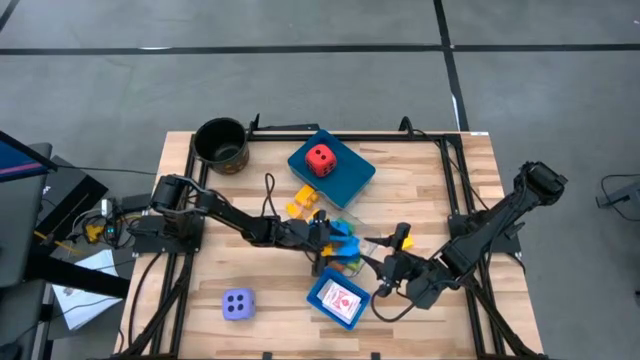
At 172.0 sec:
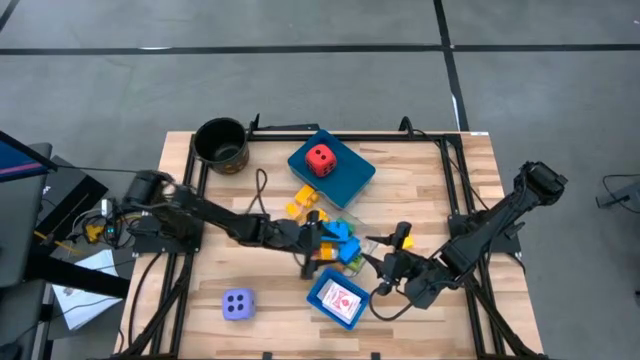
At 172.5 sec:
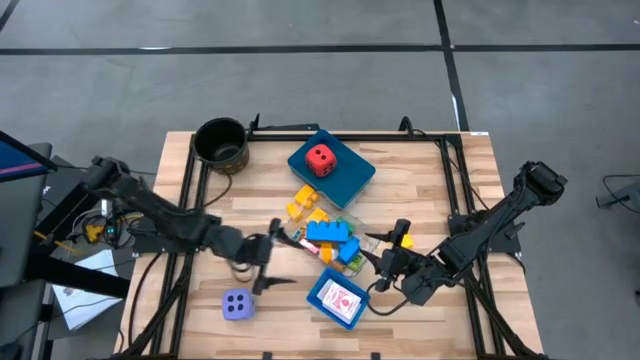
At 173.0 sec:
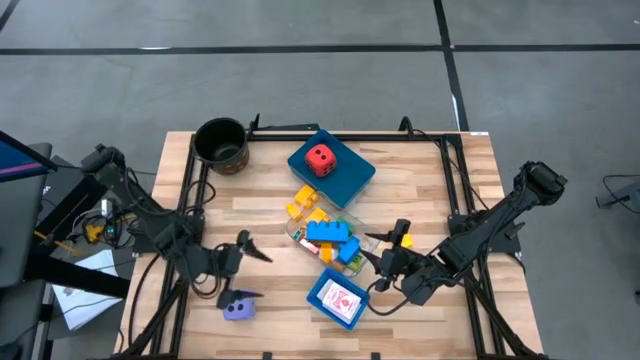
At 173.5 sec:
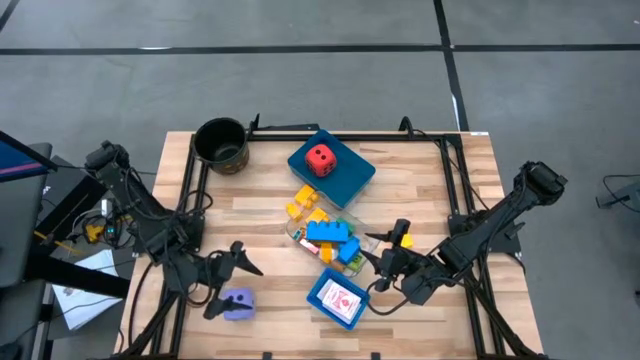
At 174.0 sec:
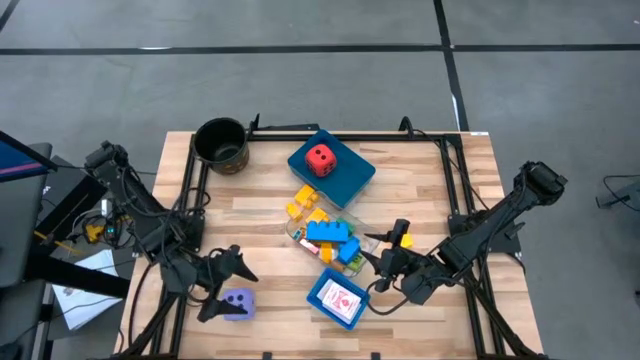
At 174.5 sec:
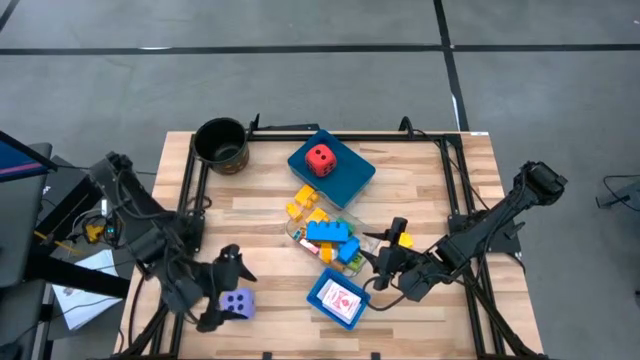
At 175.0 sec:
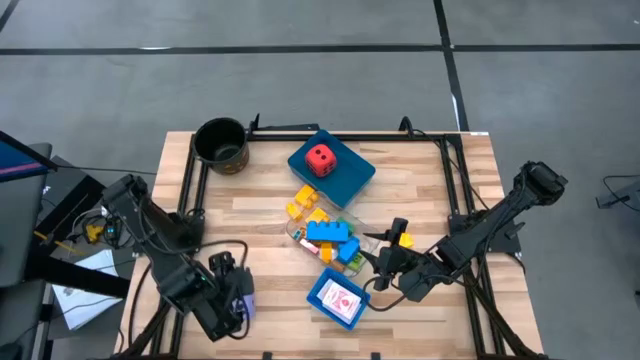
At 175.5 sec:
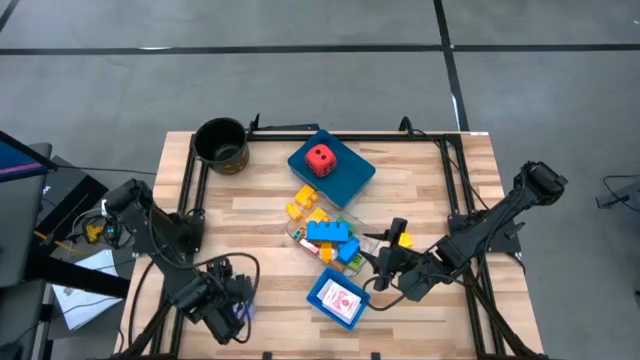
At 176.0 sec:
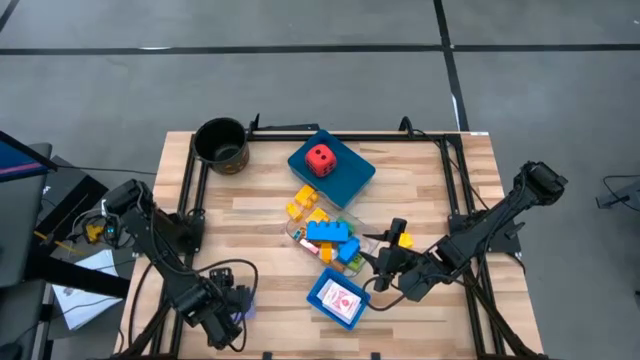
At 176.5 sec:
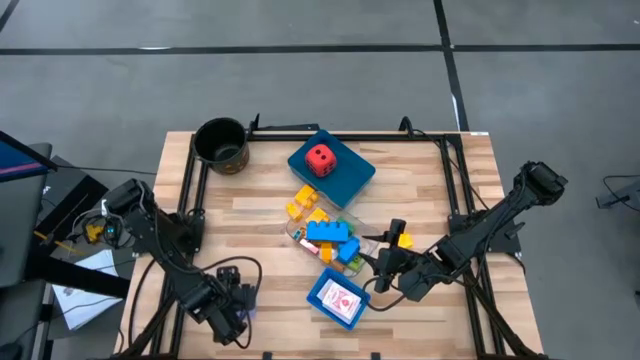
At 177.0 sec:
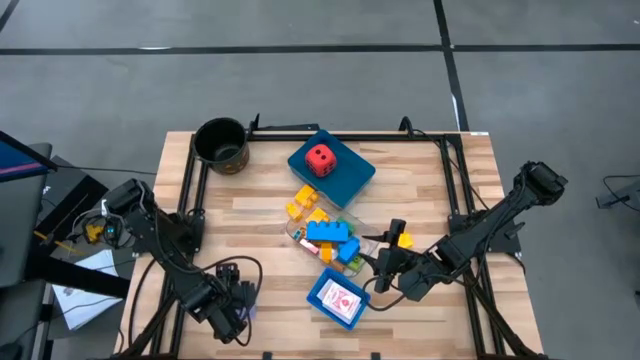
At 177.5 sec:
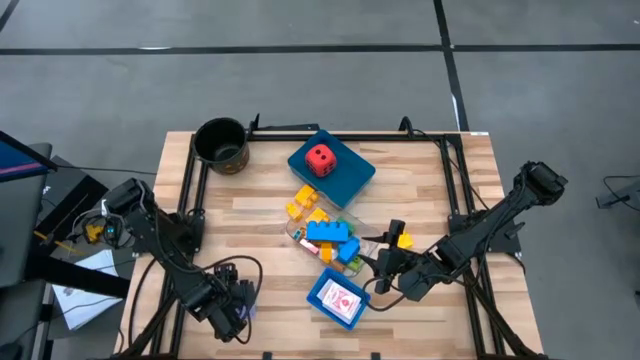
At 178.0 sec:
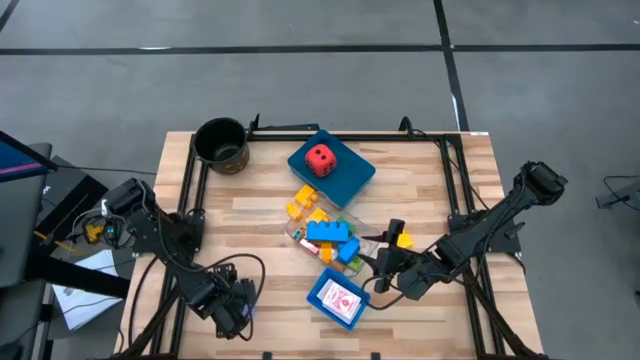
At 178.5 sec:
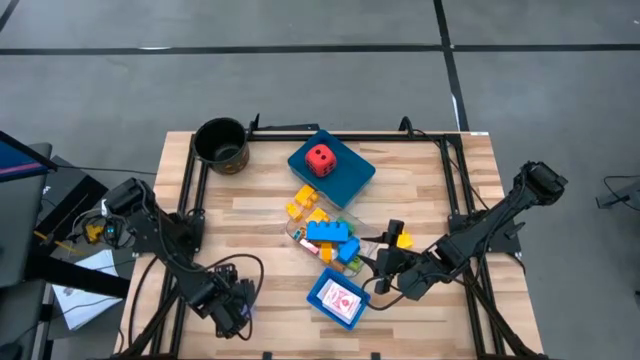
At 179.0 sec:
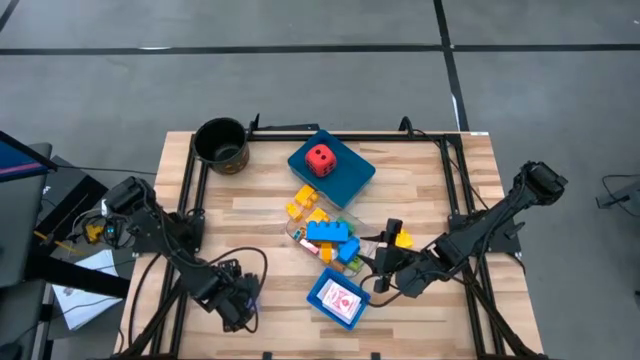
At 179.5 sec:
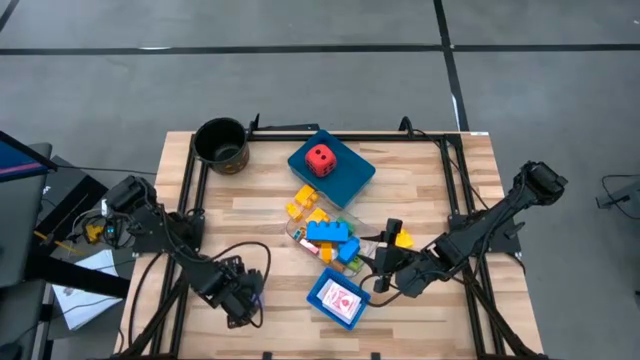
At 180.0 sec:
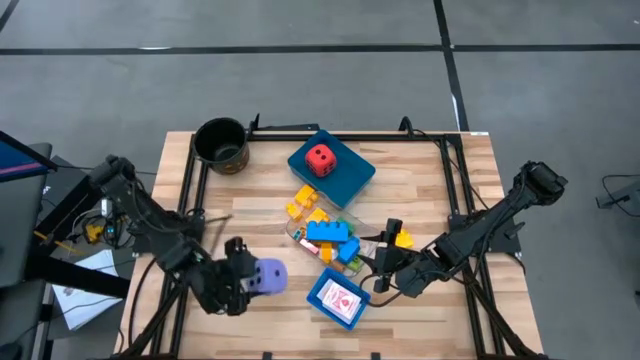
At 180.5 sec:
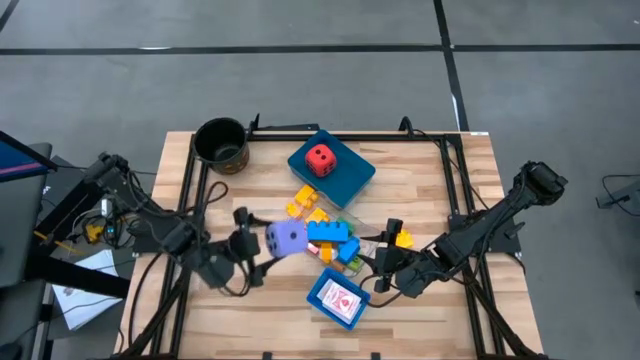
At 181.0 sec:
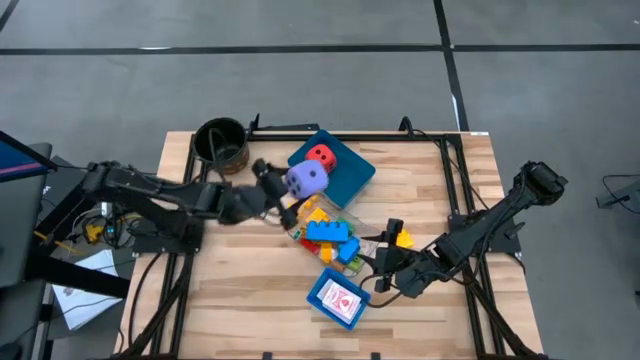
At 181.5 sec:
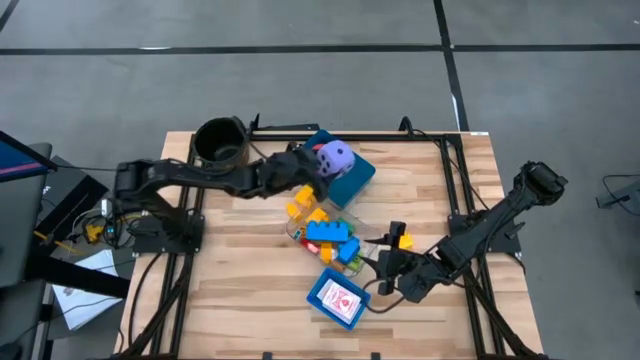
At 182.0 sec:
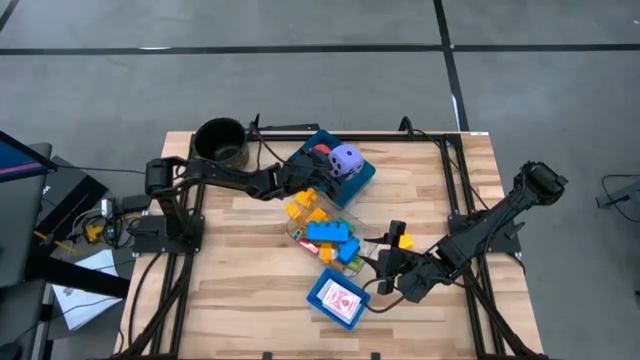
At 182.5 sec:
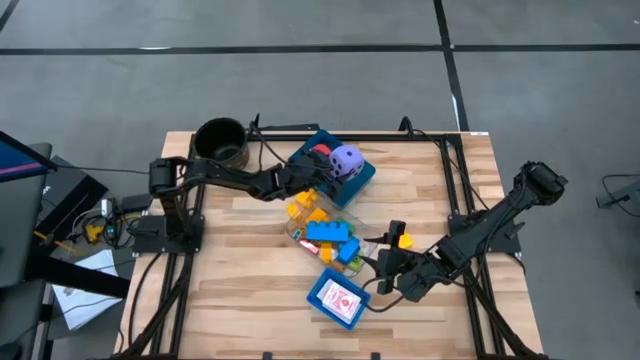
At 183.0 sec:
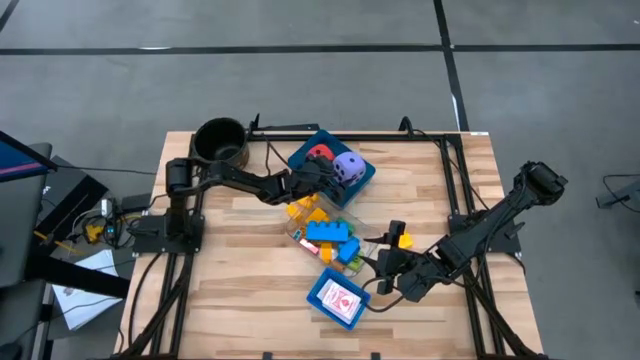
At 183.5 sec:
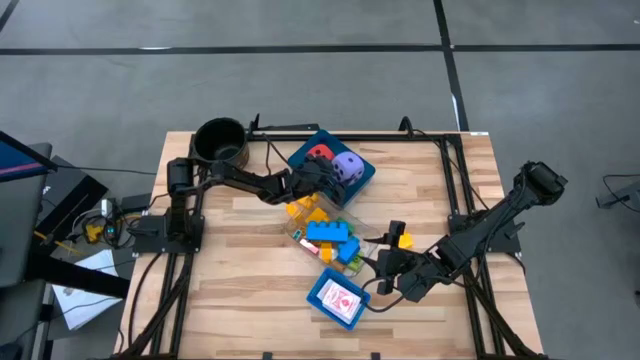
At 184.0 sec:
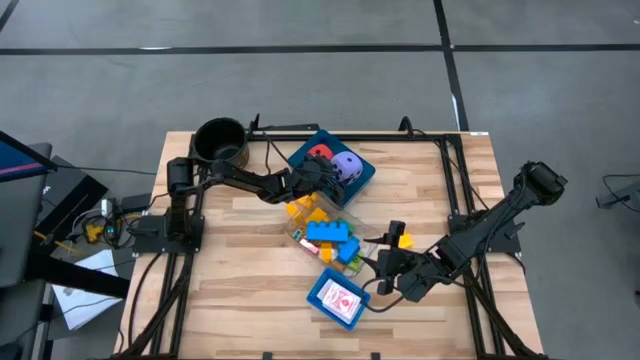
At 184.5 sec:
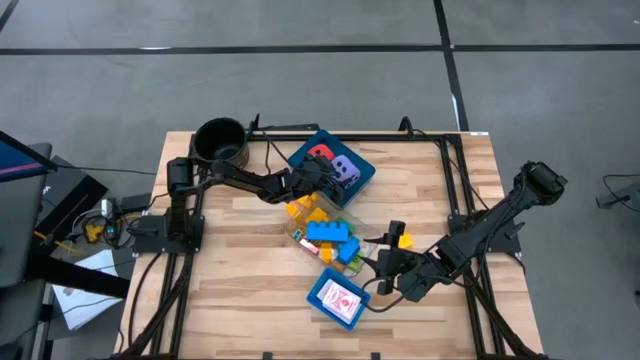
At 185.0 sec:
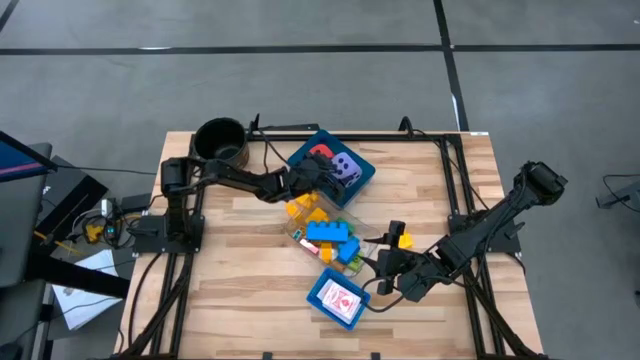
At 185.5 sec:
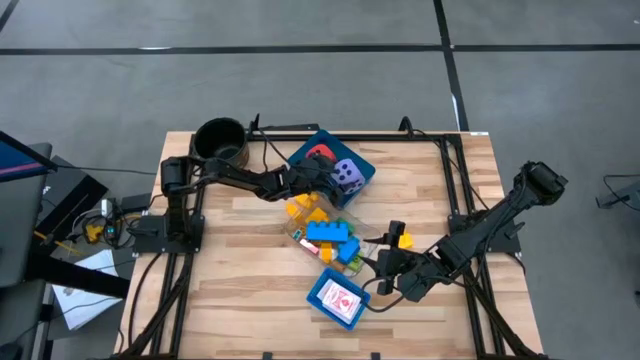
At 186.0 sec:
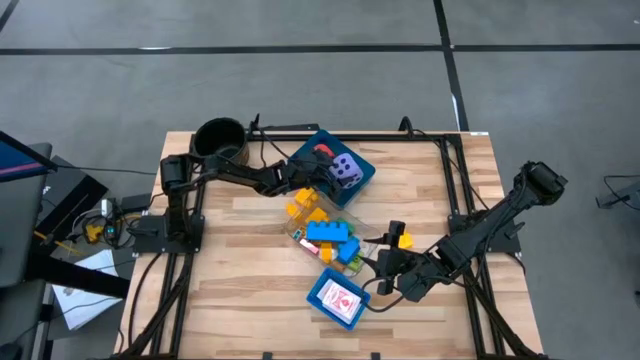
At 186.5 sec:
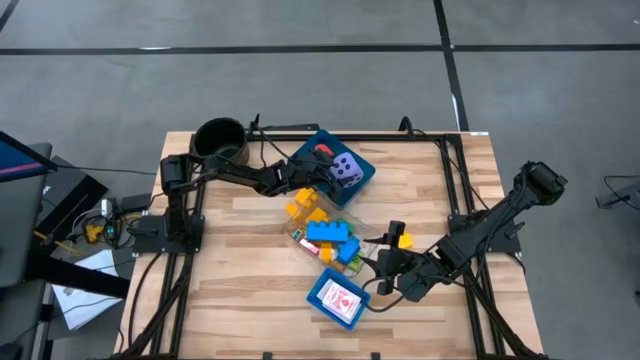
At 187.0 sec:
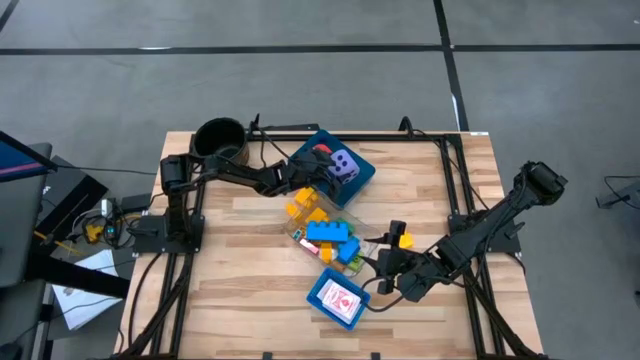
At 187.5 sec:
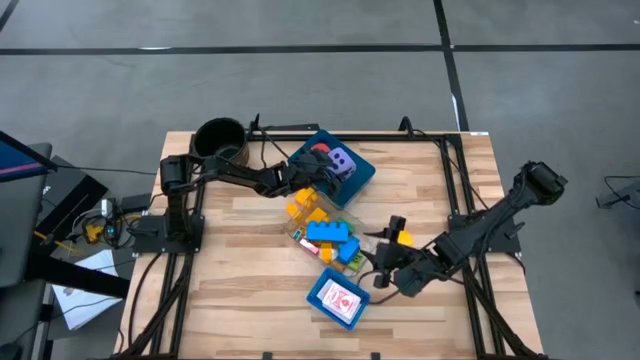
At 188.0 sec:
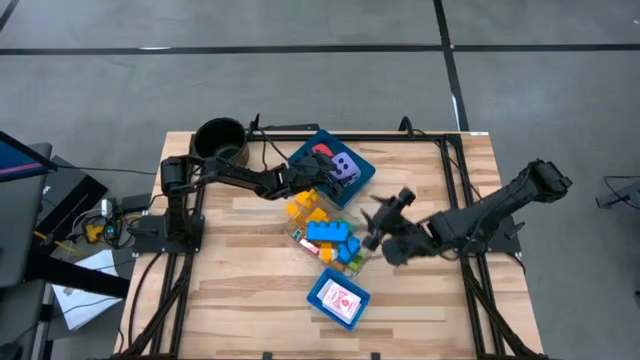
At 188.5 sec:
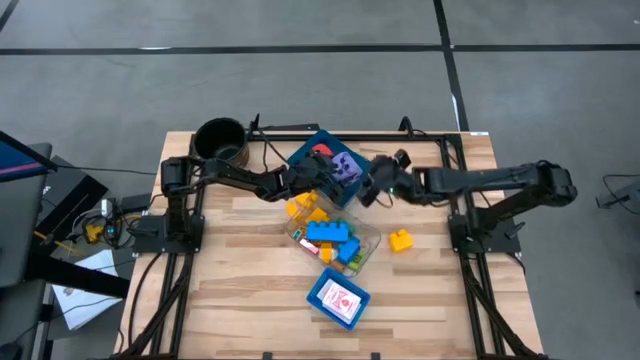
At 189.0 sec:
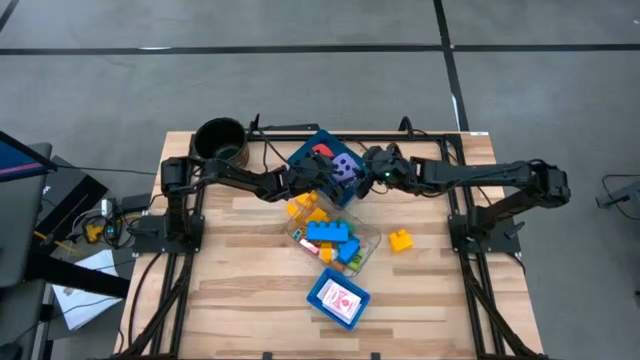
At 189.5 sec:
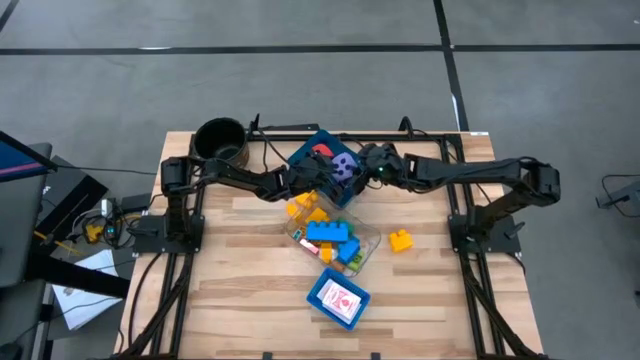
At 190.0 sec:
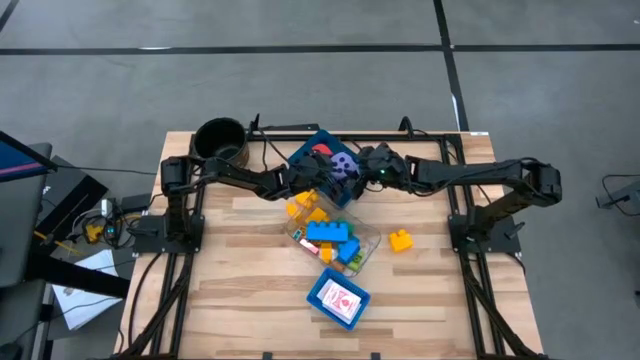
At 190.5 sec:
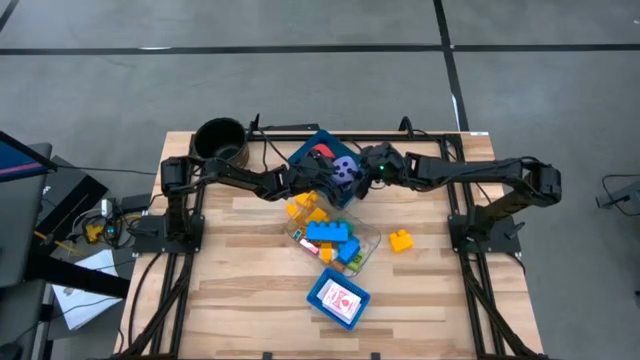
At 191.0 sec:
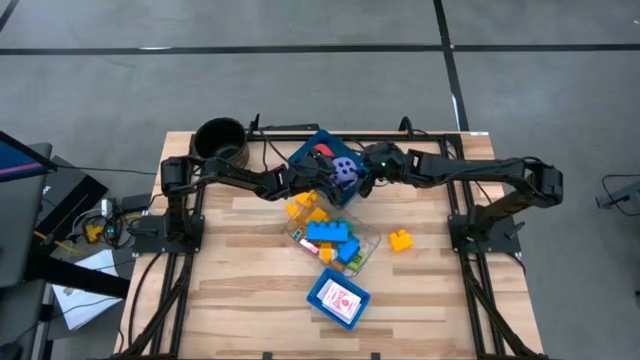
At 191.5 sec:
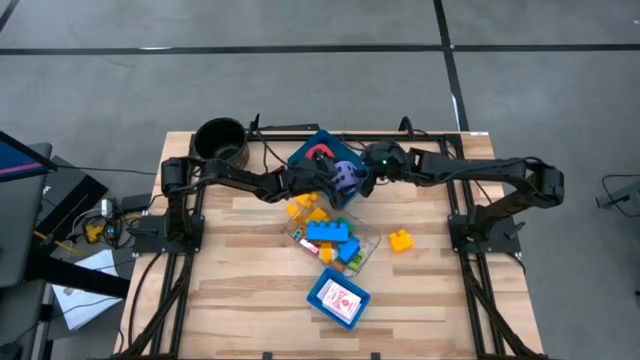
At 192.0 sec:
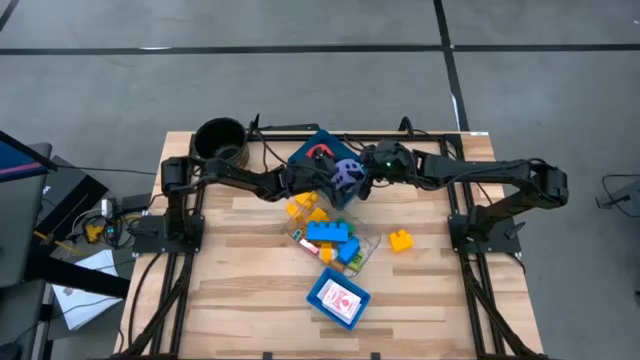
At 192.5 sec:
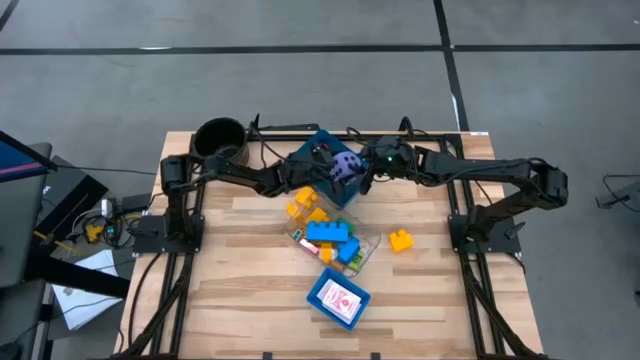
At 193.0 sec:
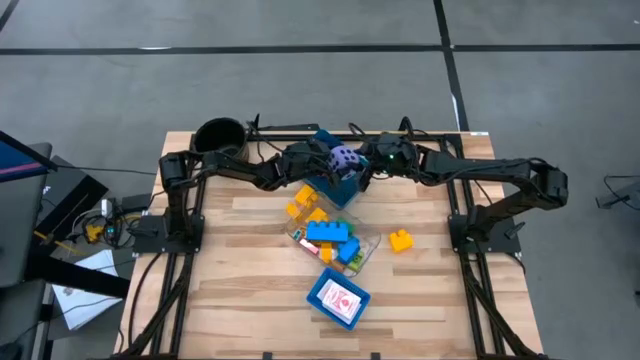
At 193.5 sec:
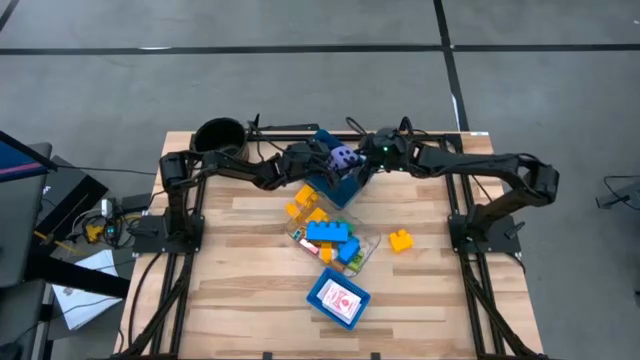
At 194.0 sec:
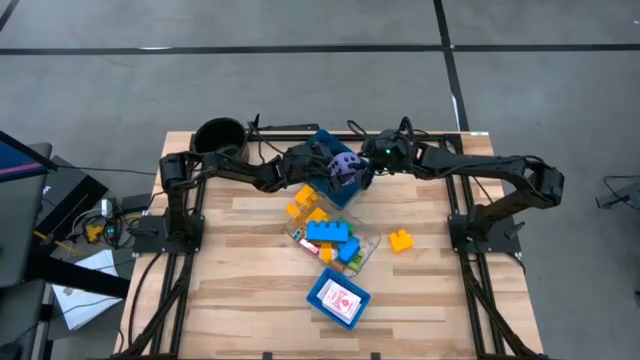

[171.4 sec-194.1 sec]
Task: Pick & Place Toys
Put the purple dice into the ocean blue bin
